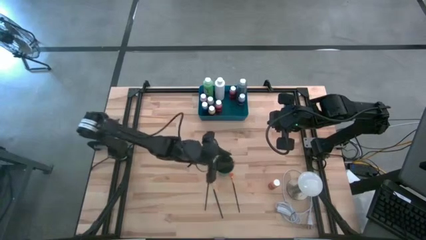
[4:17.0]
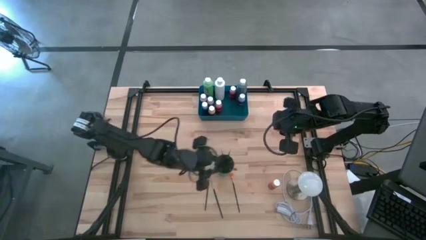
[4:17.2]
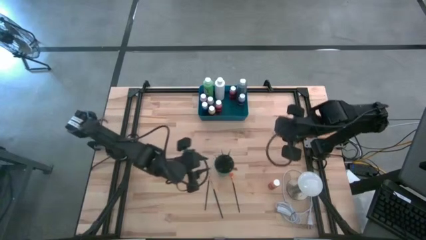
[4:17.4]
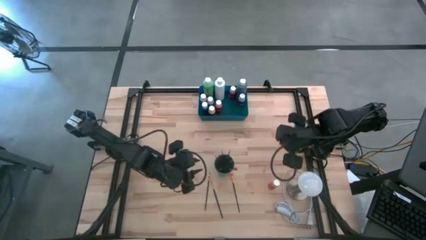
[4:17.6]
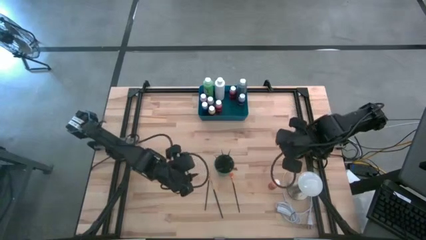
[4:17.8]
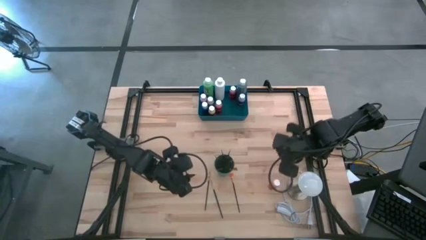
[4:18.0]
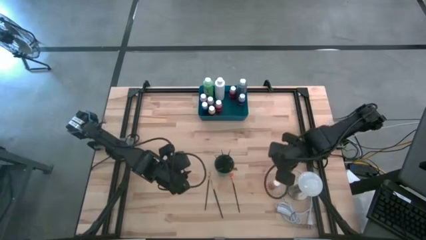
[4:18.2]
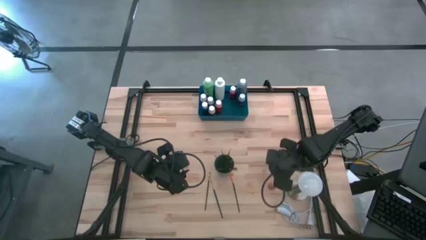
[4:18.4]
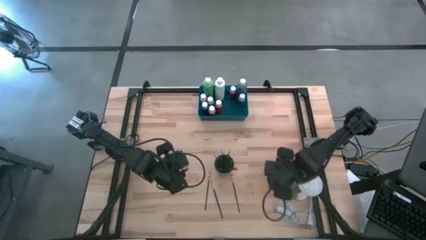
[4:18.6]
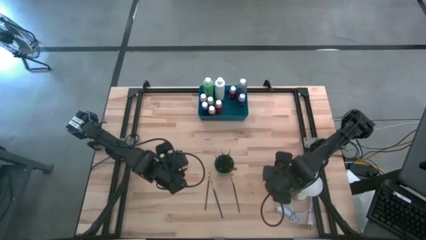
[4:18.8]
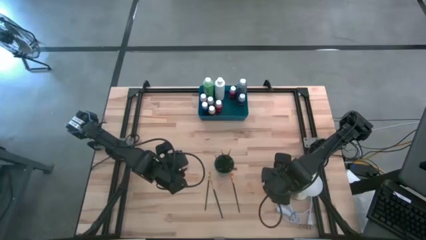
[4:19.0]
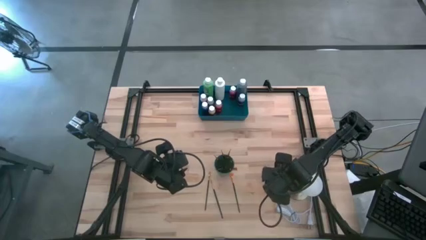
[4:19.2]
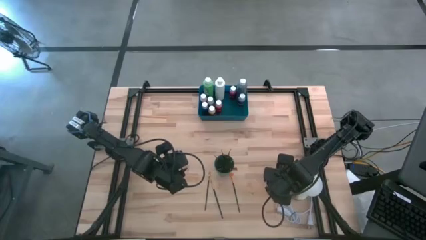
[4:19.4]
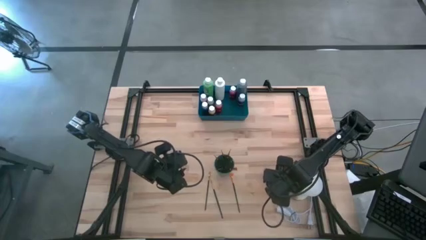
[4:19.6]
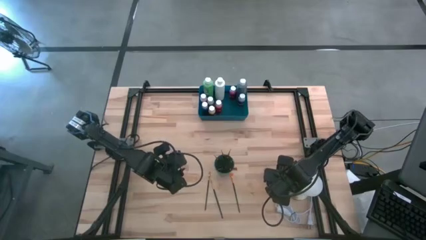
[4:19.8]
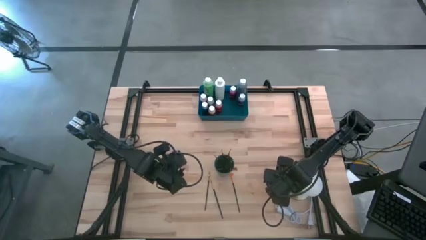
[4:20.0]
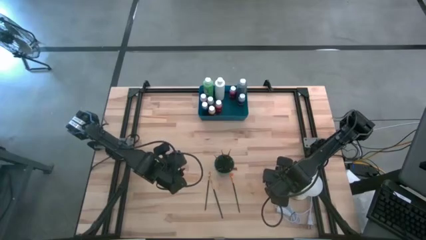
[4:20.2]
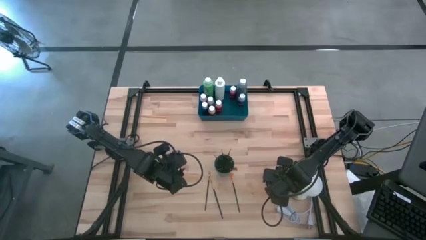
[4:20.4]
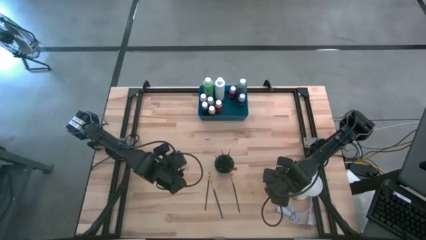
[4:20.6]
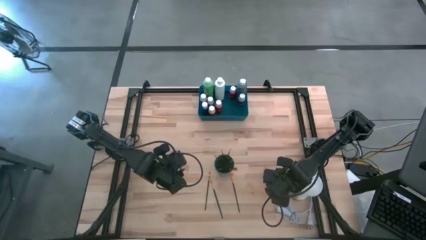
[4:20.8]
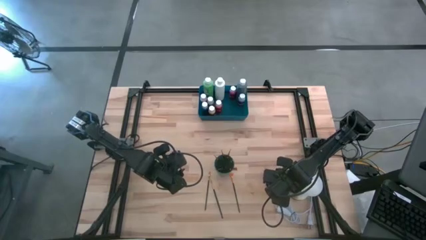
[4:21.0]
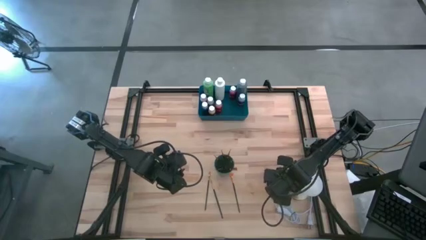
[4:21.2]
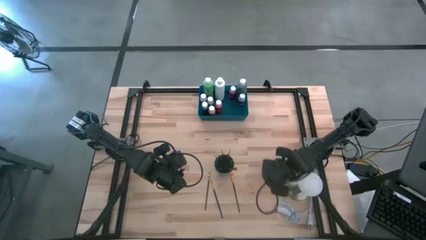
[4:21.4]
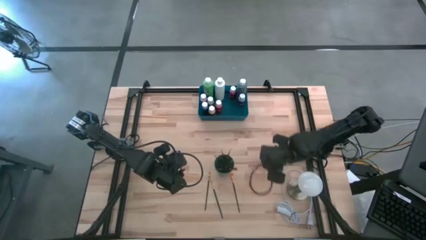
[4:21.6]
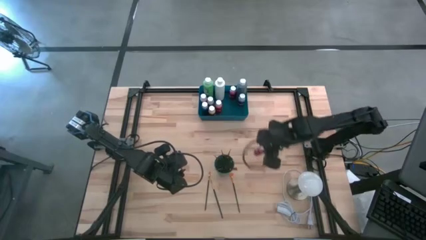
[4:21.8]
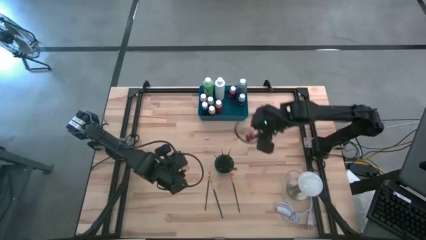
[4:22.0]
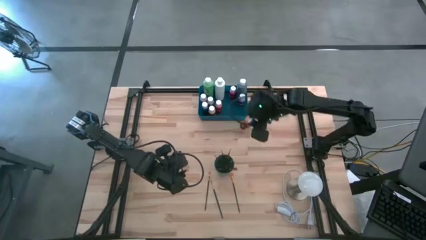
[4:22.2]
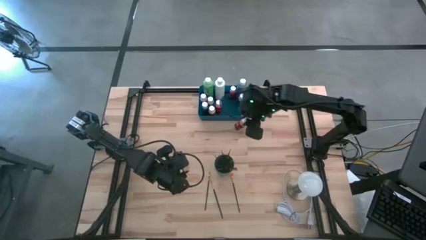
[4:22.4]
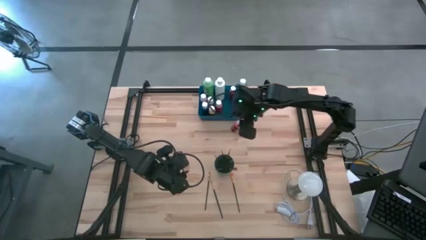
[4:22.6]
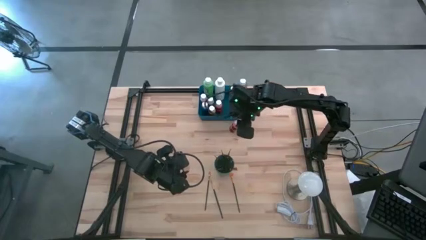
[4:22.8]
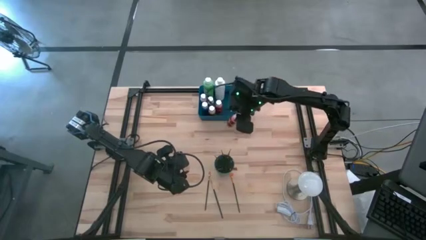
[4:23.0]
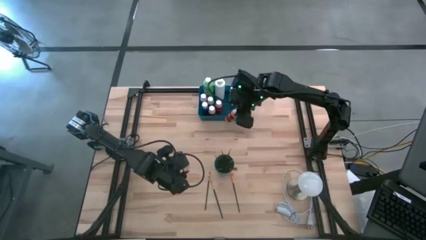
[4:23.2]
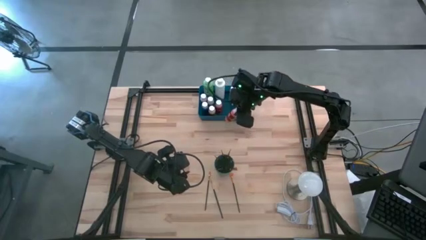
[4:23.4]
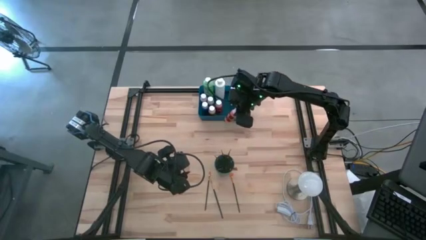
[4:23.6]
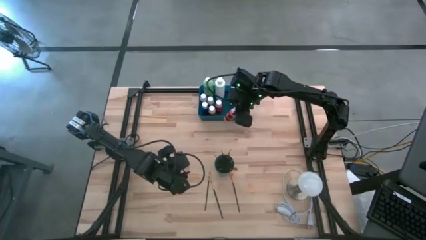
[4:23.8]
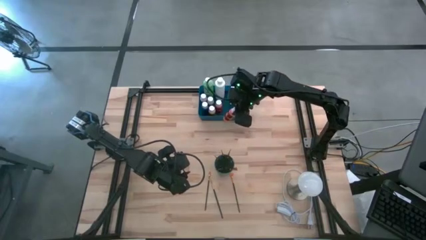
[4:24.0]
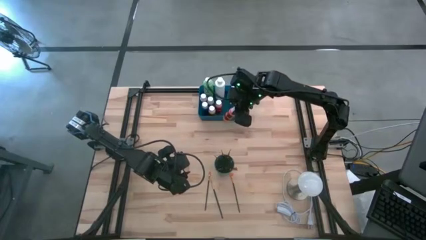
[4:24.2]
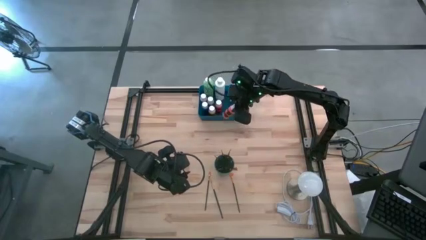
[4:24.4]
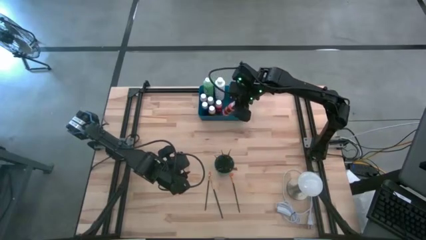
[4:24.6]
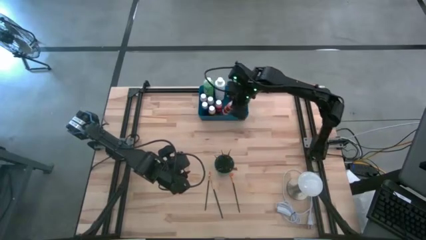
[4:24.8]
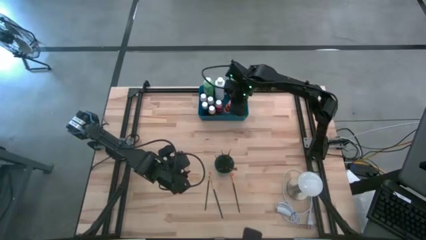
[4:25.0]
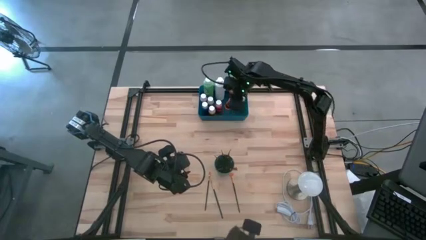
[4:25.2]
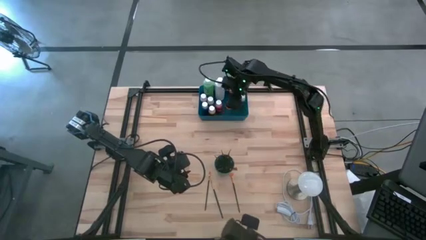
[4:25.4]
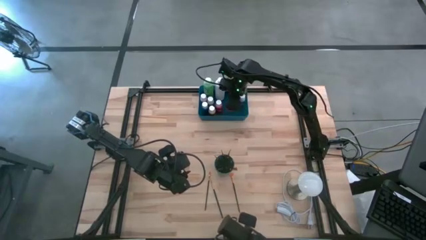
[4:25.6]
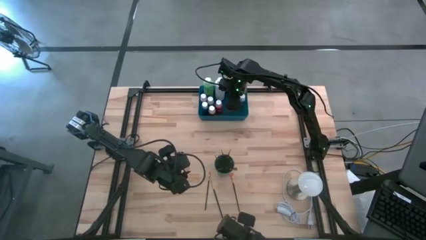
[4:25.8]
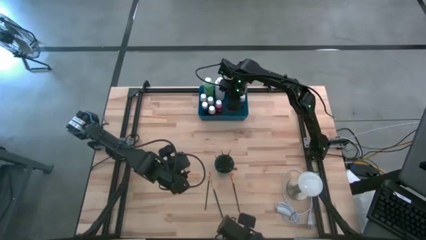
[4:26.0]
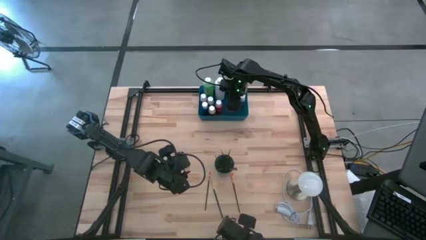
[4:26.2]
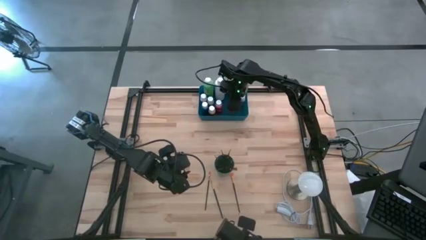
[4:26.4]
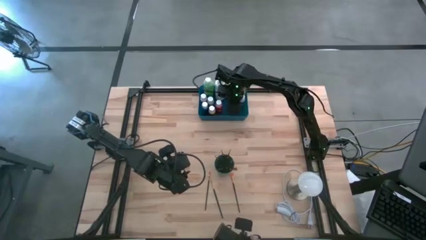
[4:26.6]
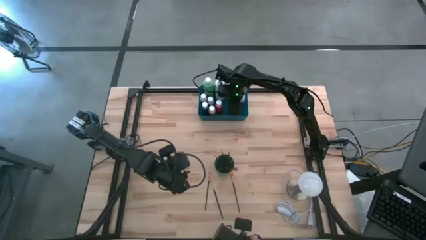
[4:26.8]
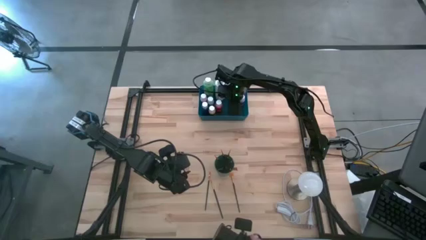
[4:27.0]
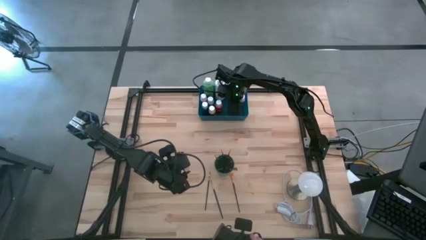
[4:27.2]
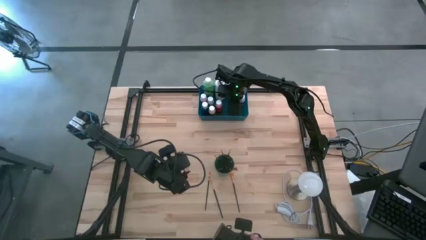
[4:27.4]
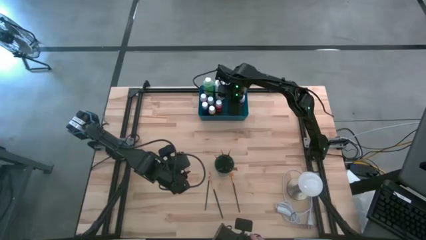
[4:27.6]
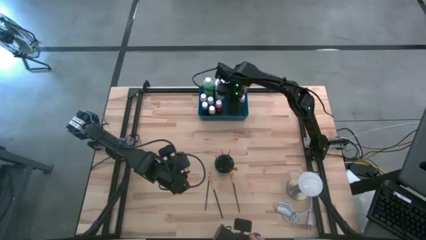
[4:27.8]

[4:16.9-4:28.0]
Task: Pick & Place Paint Supplies
Put the light orange paint bottle into the blue bin
